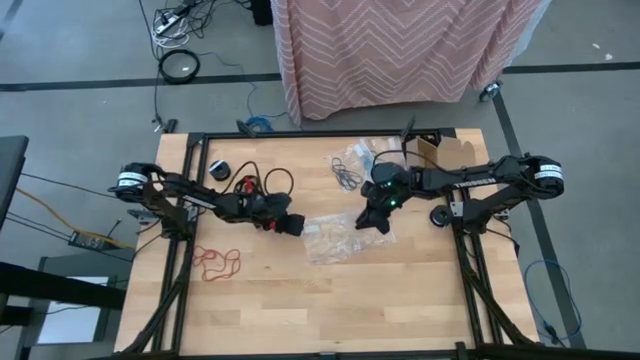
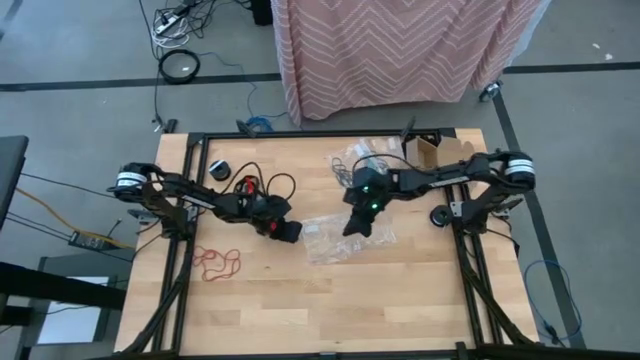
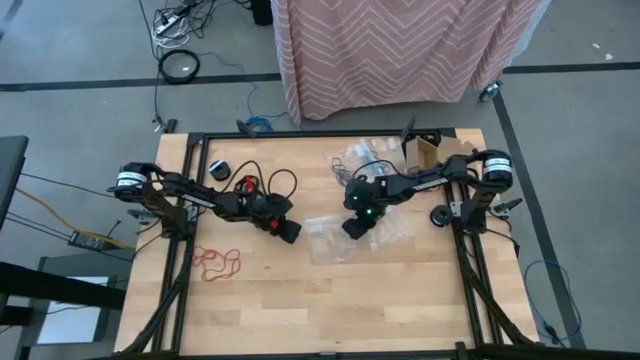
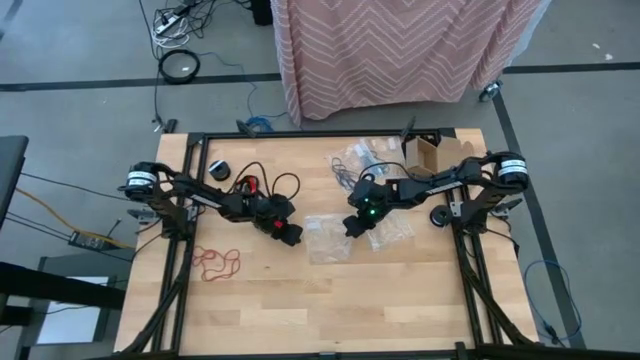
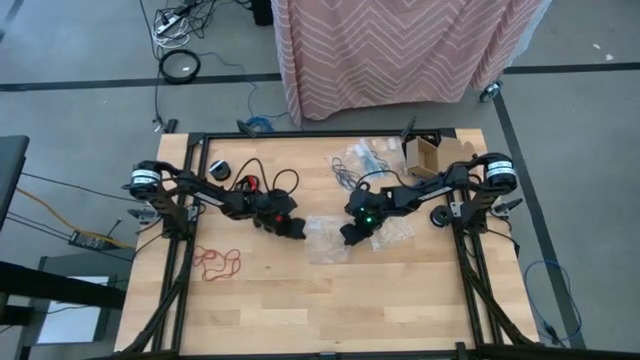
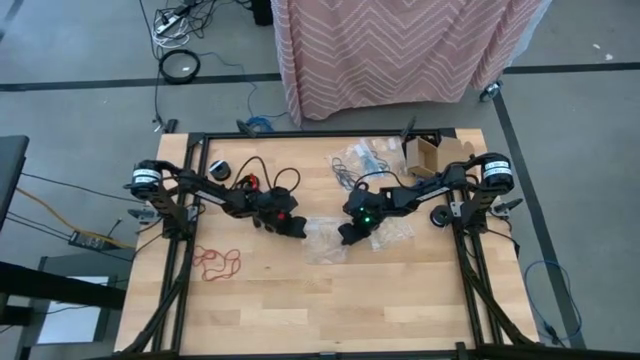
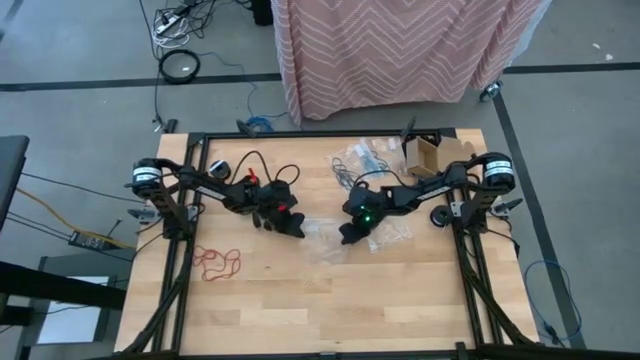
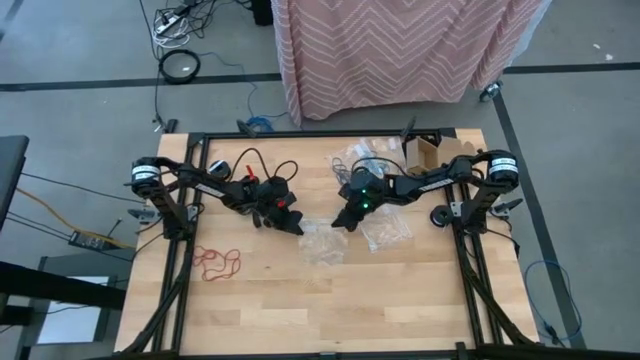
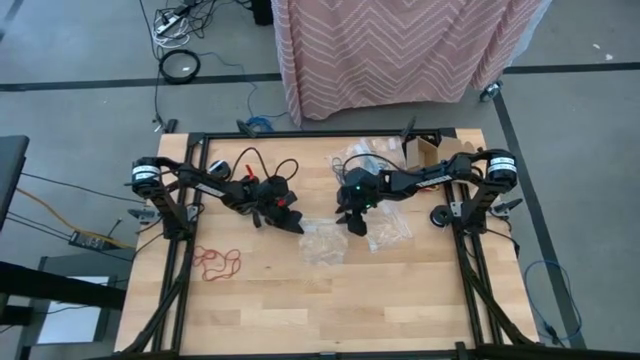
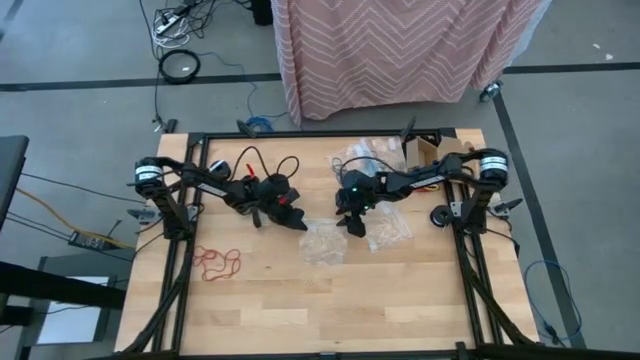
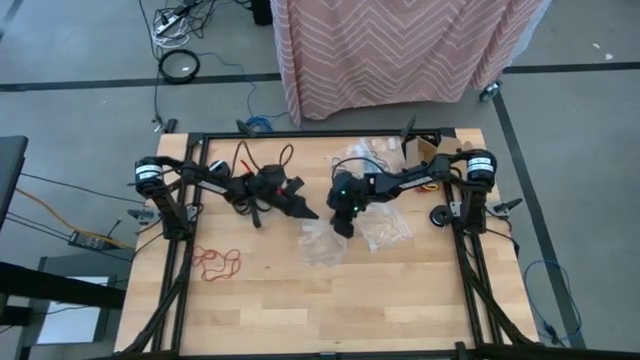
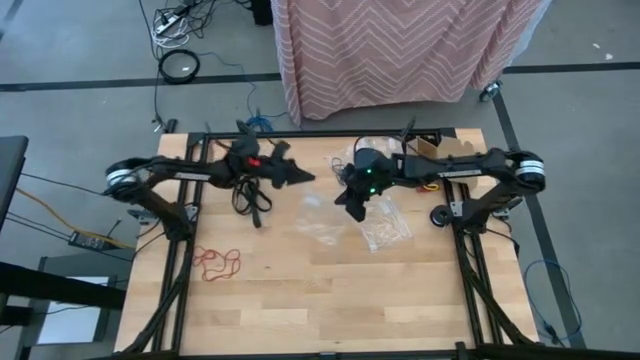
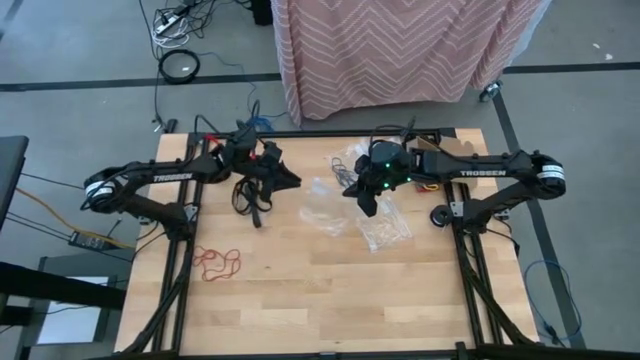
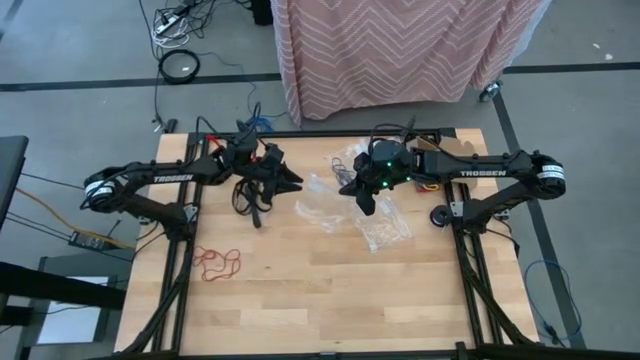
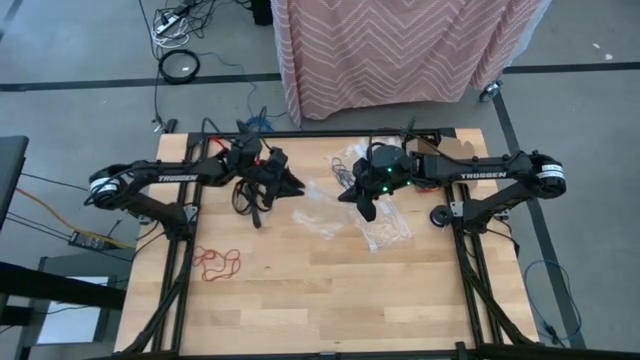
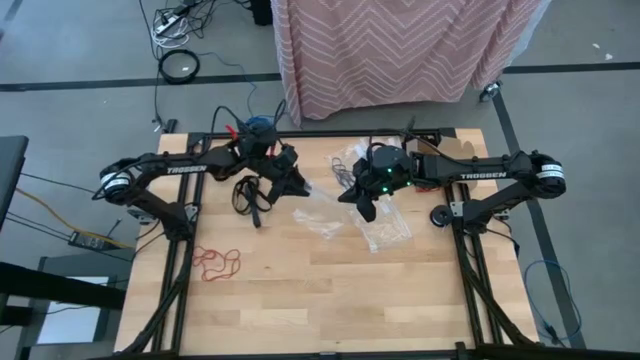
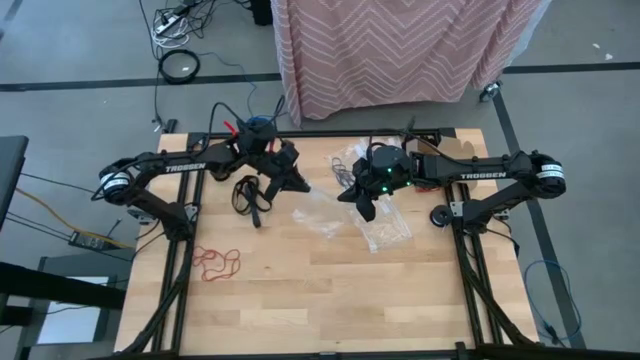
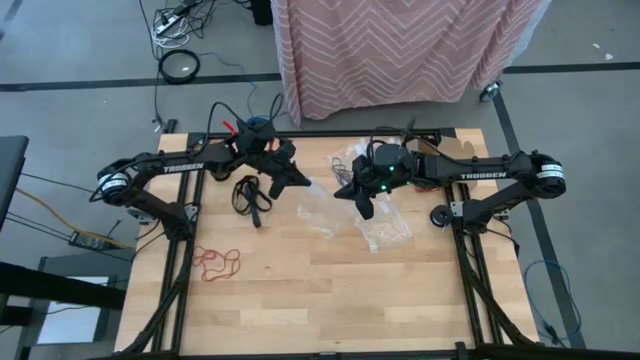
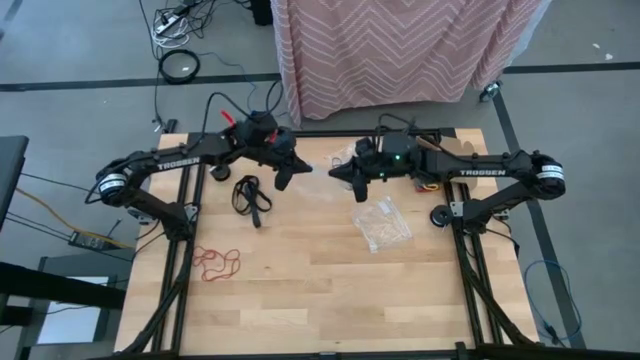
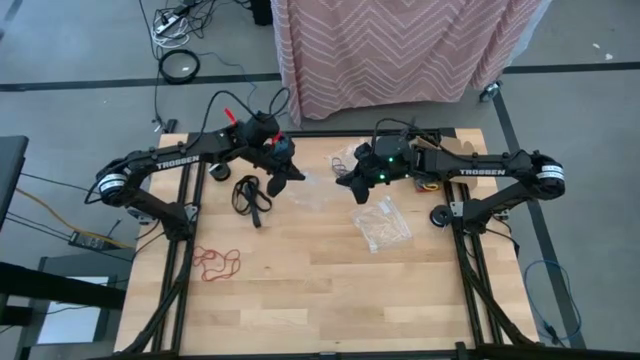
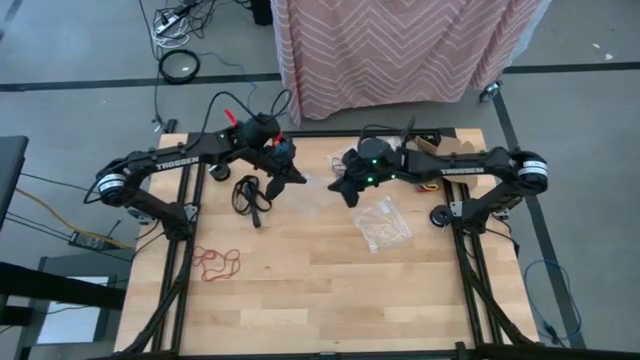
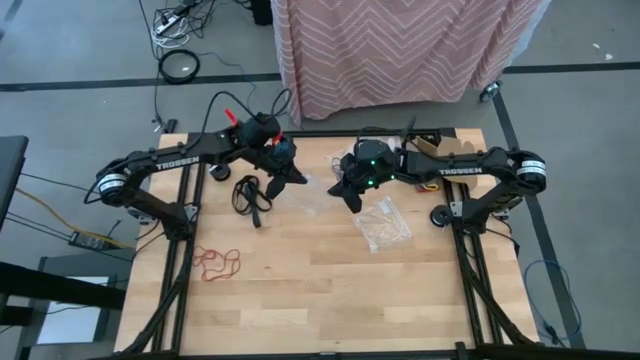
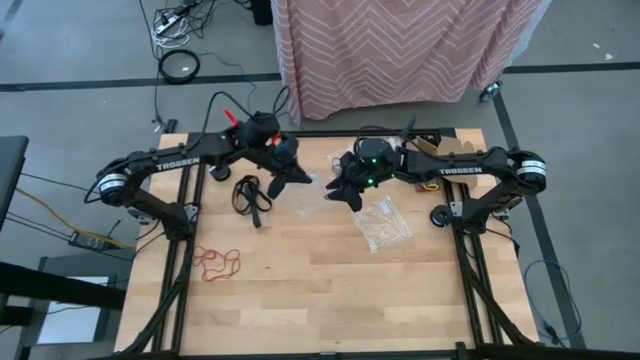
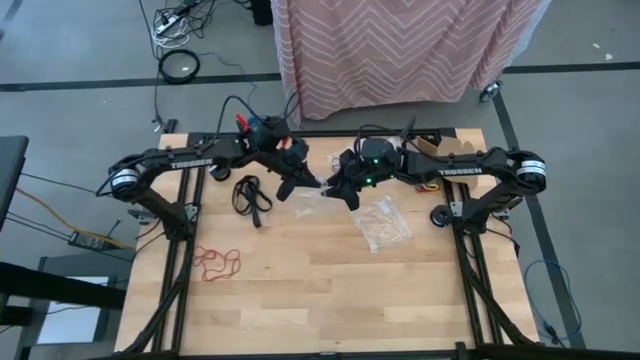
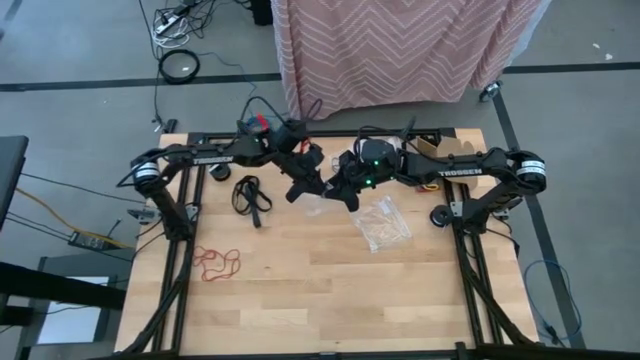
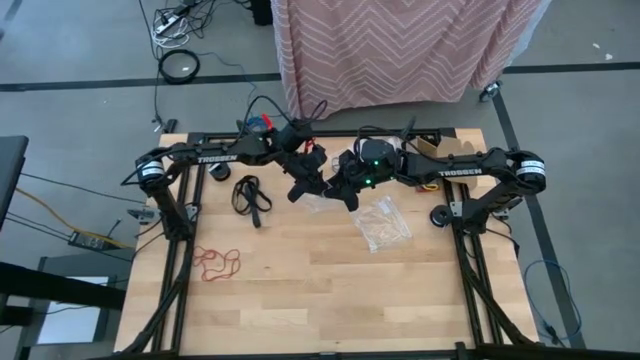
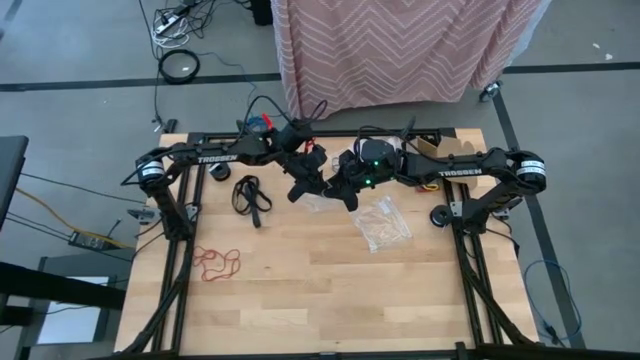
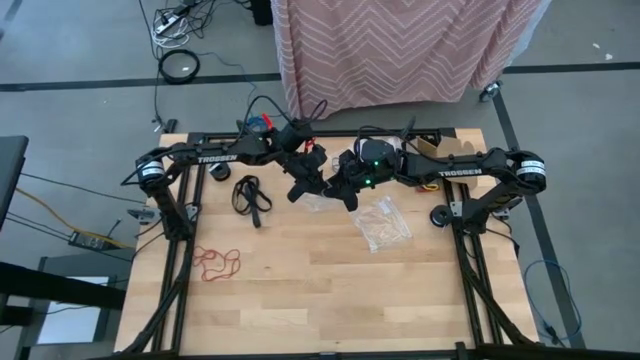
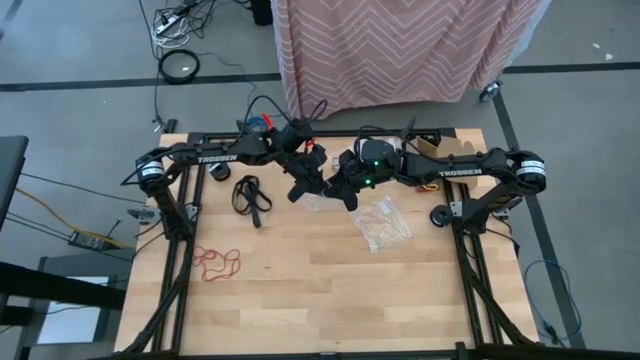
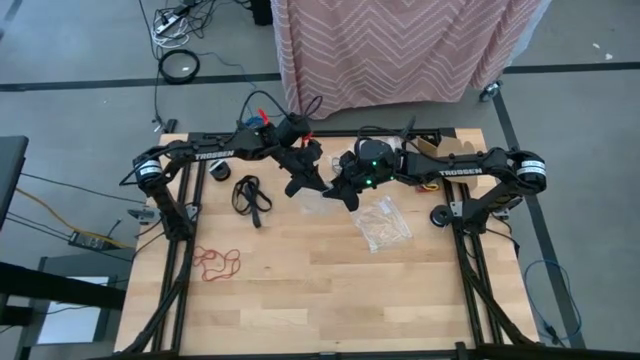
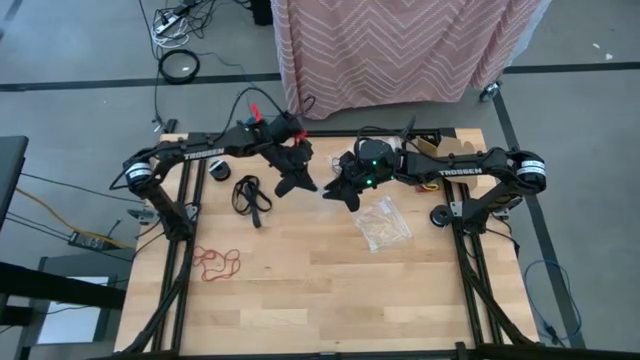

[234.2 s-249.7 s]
Task: Sort rubber bands
Open the left transparent zip bag

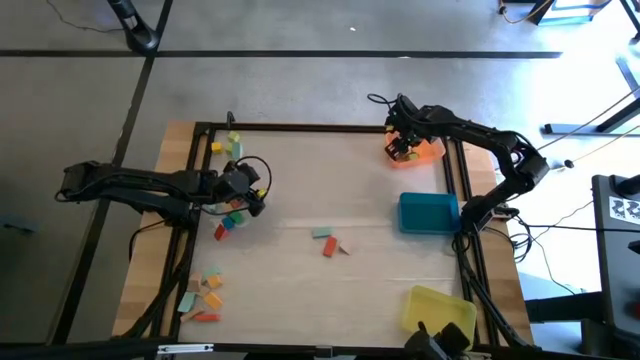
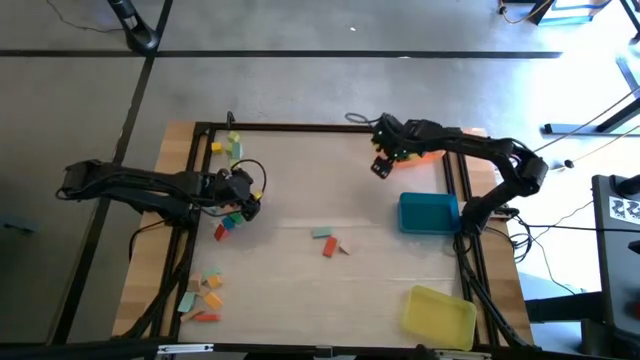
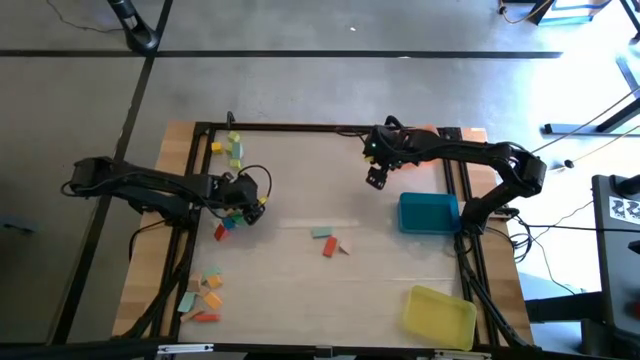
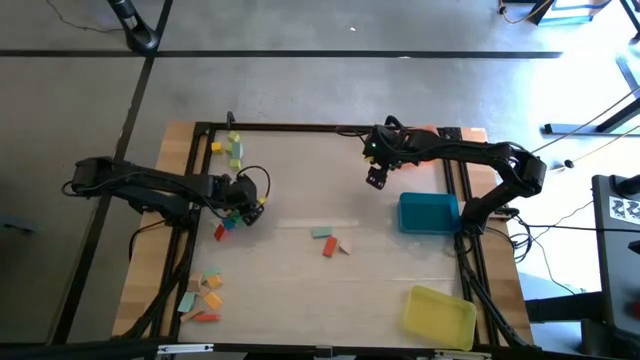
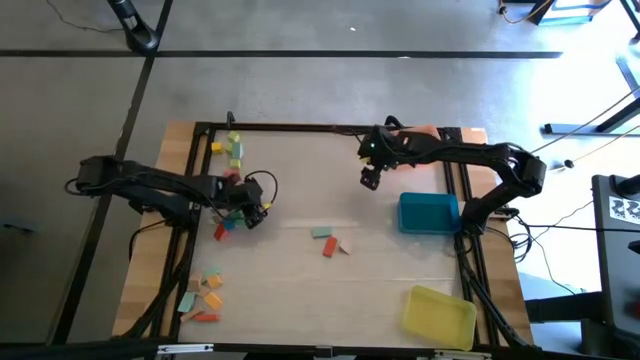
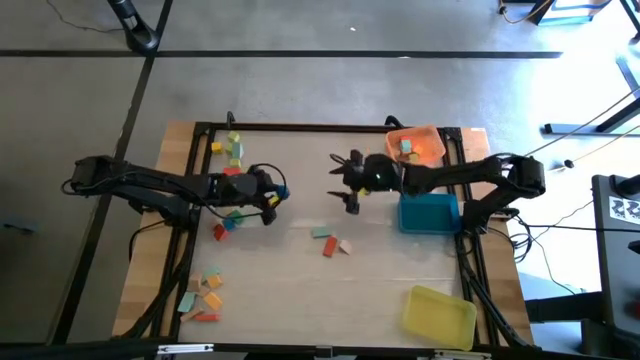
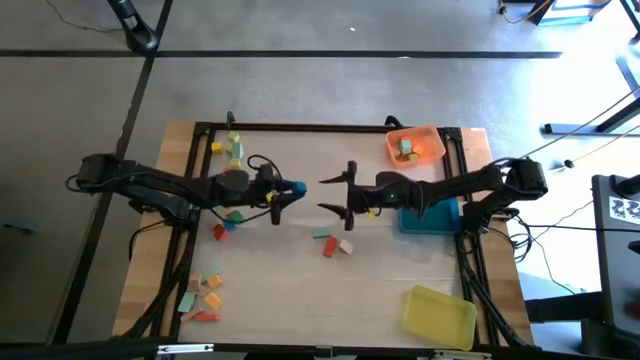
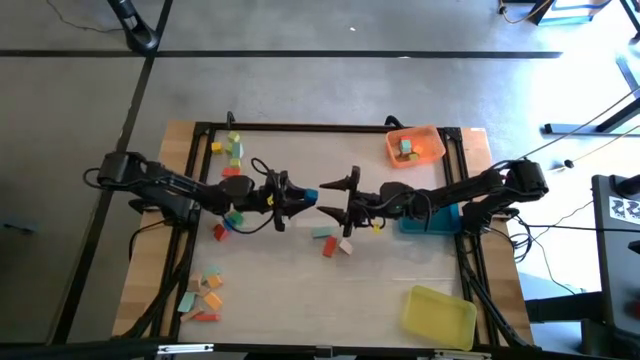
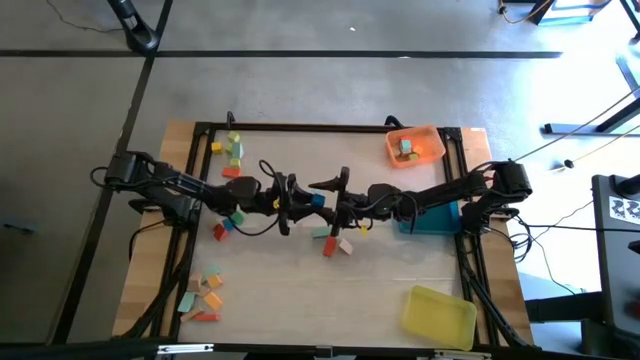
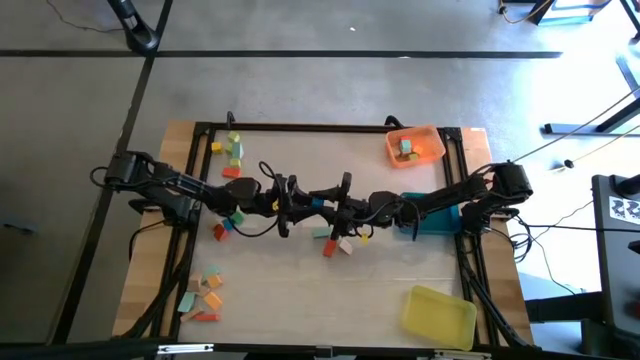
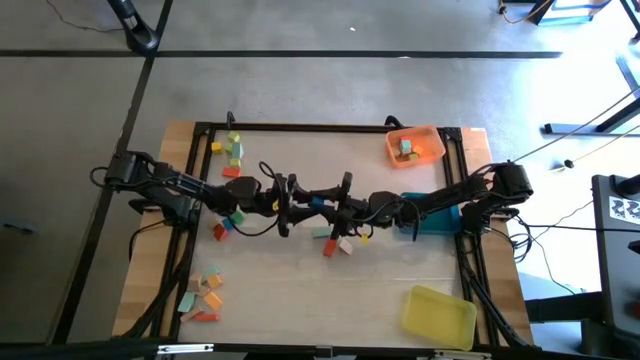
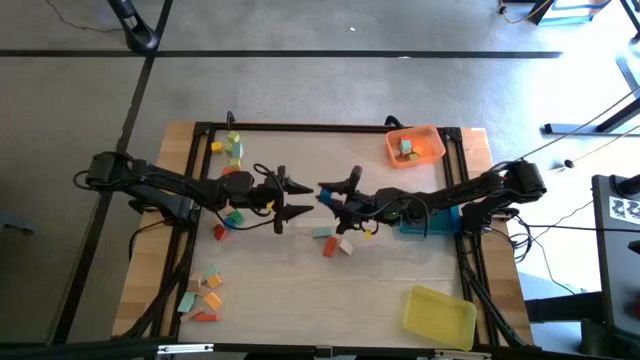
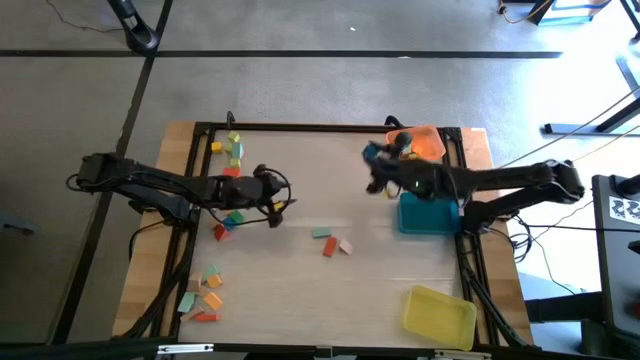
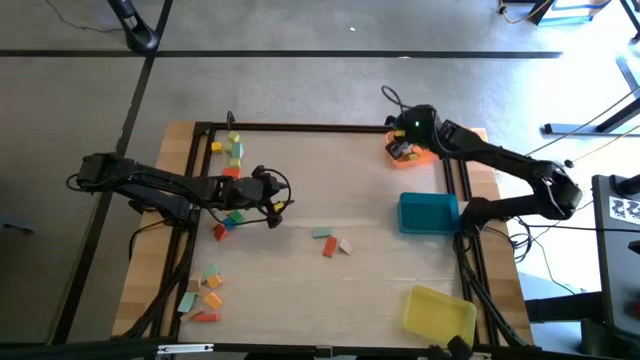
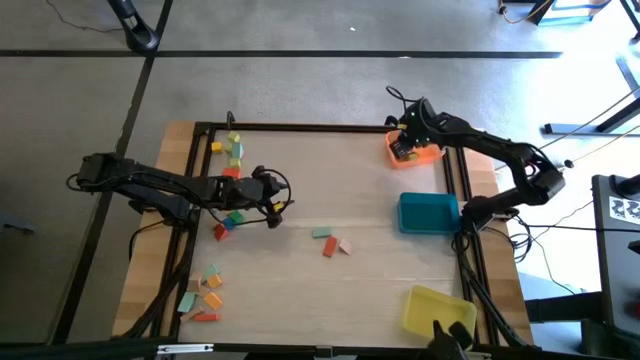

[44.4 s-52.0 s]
Task: Sort blocks by size
Put the blue cube block into the orange bin
